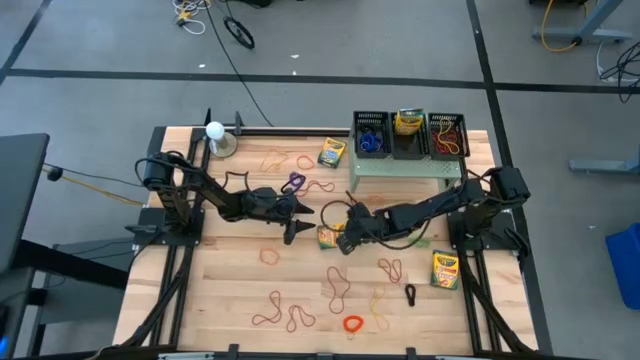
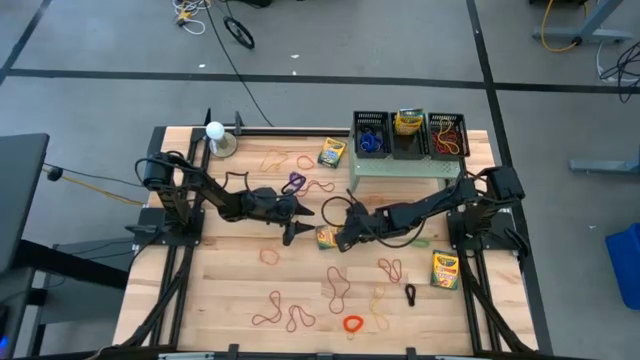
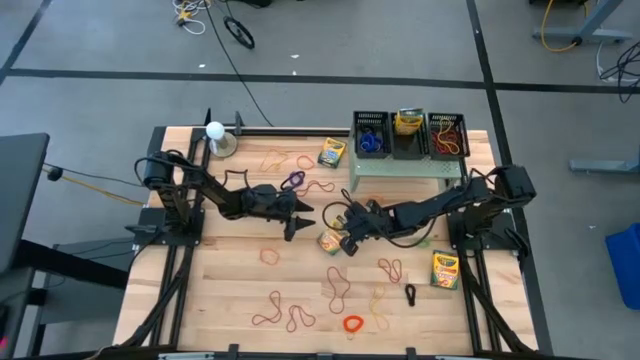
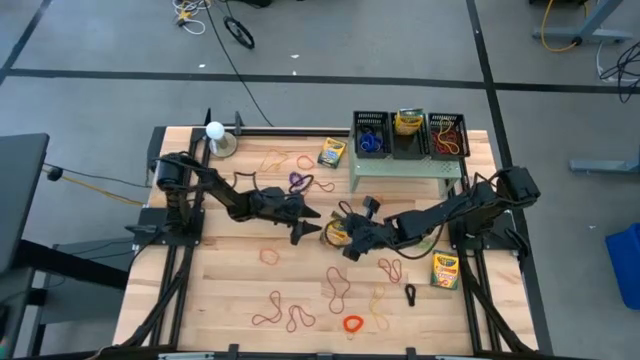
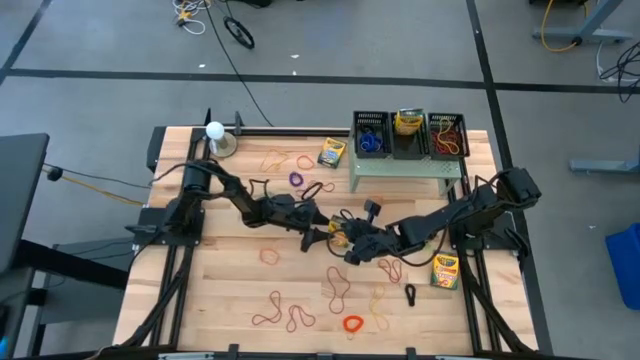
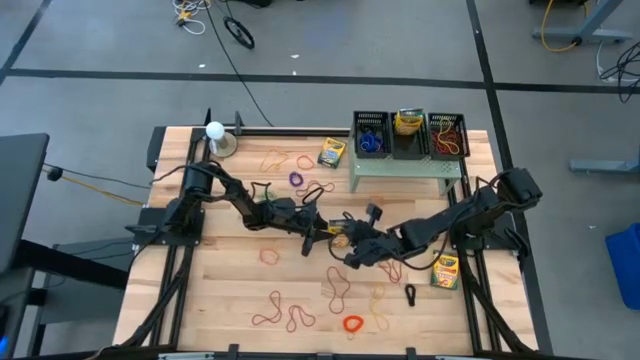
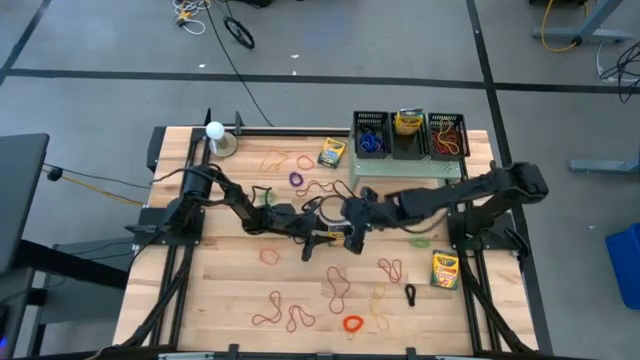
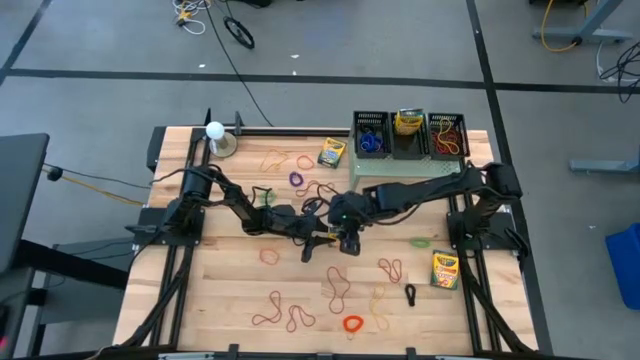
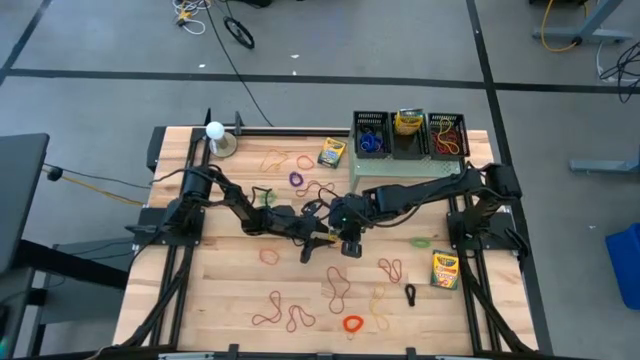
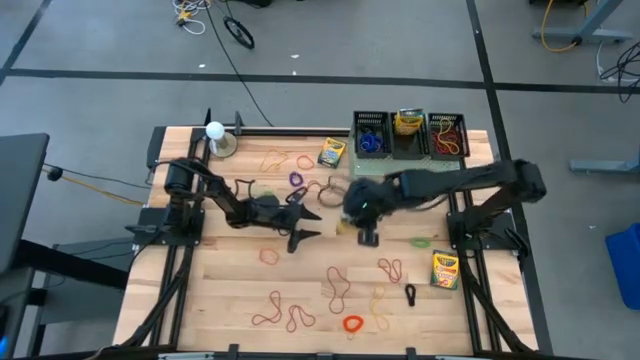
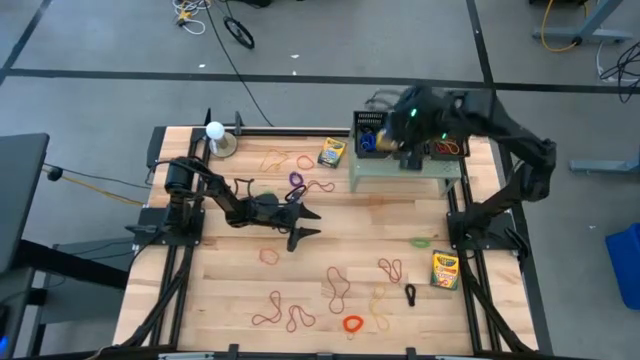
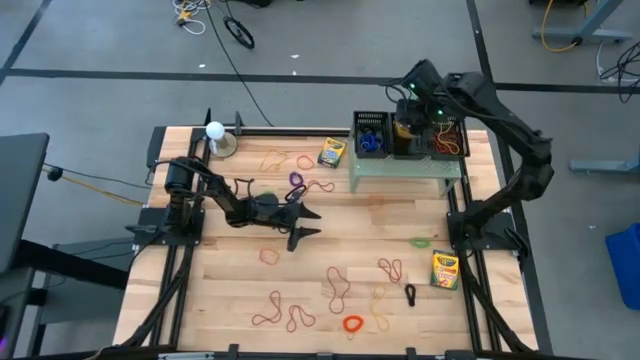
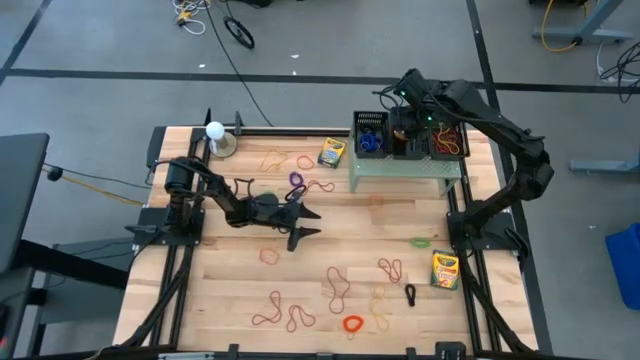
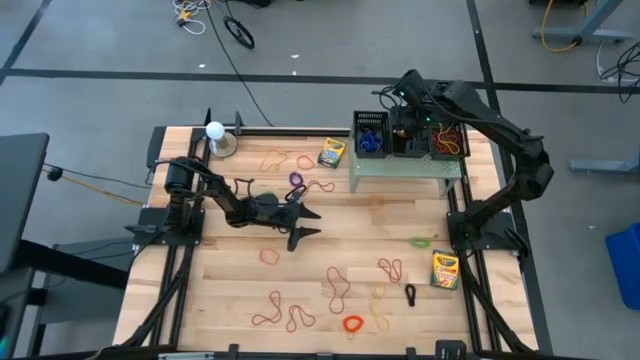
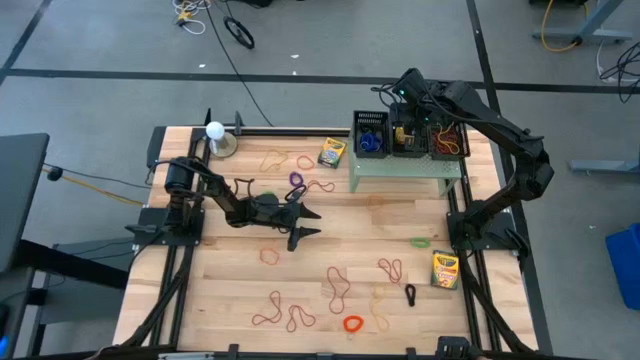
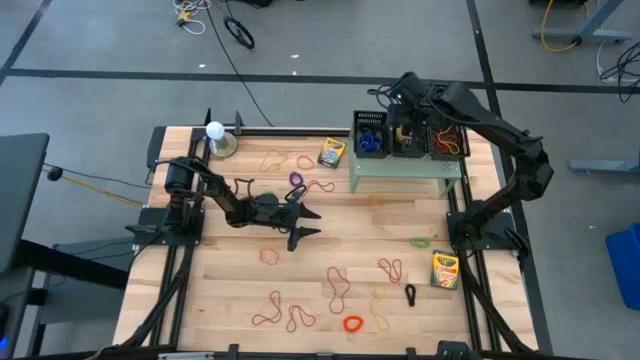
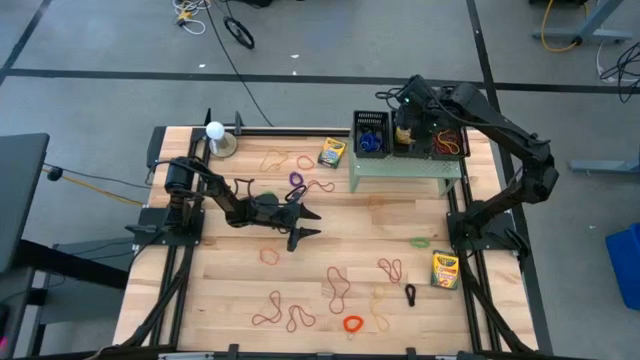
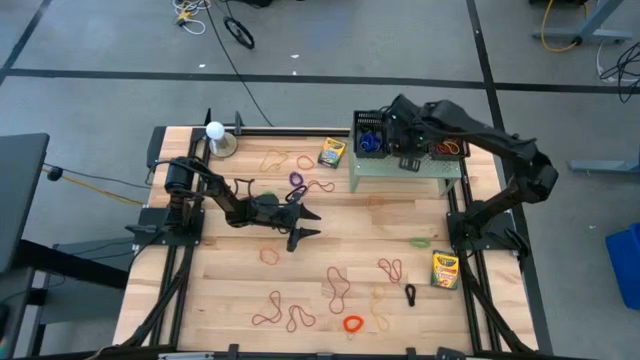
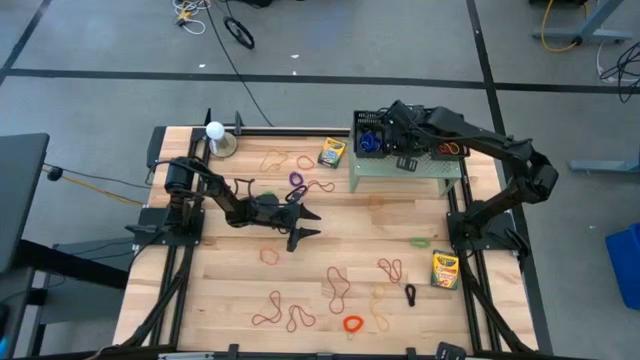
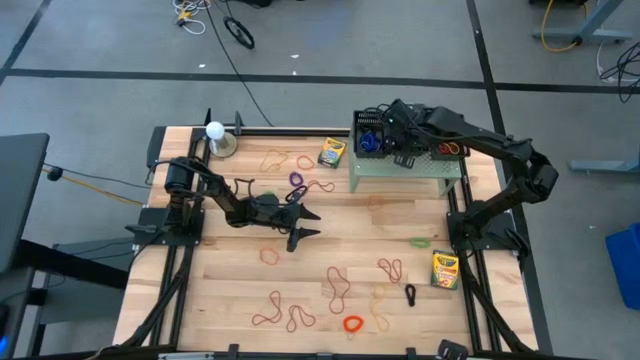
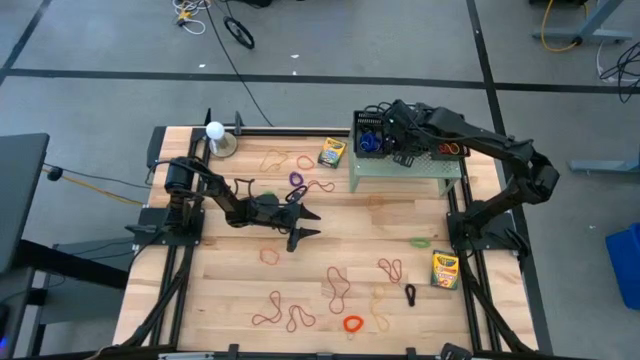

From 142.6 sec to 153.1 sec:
Task: Pick & Place Office Desk Supplies
Put the middle yellow crayon box into the middle black basket on the shelf

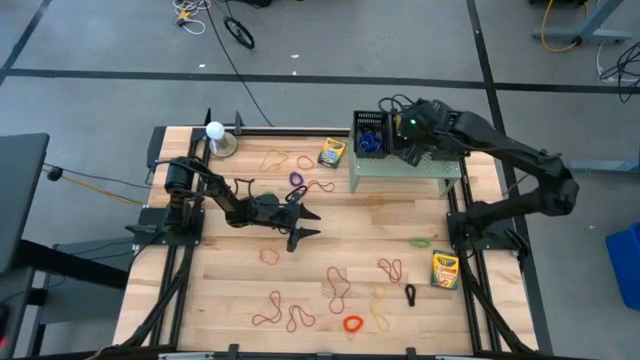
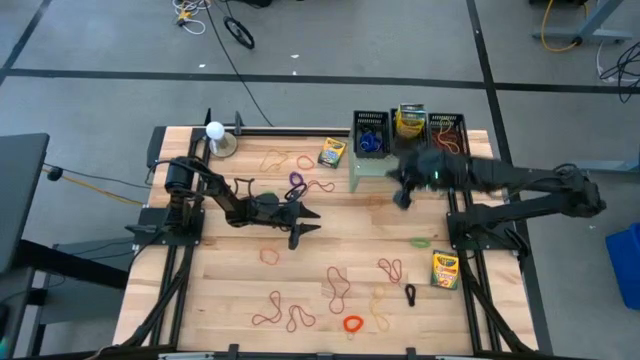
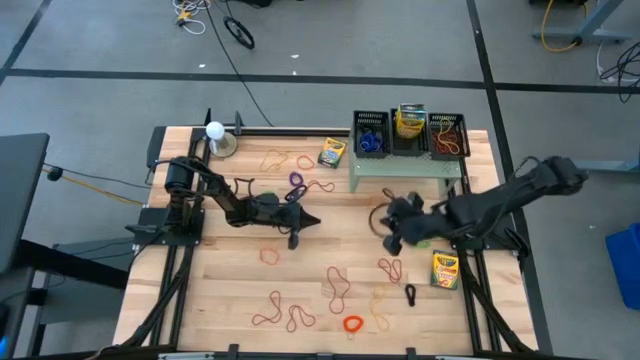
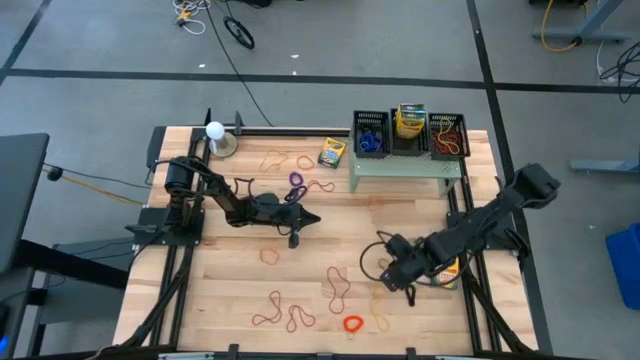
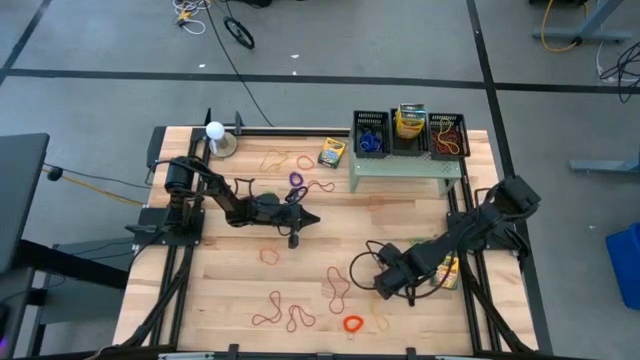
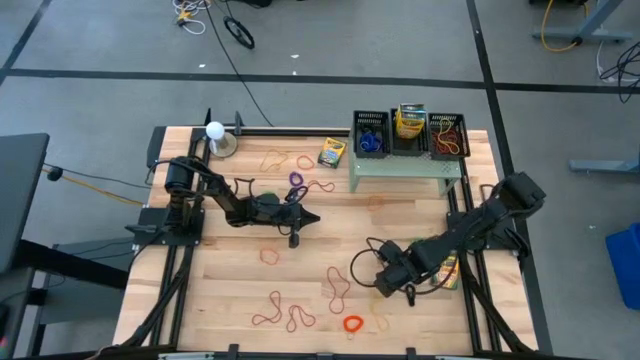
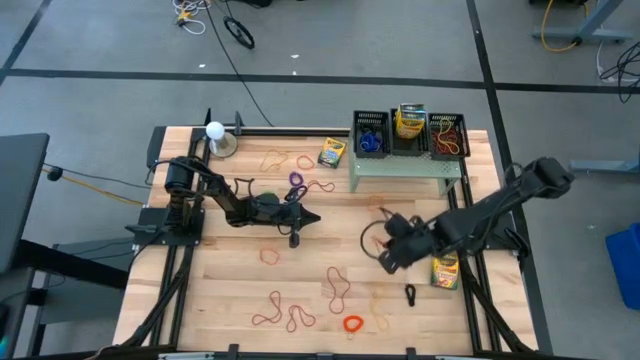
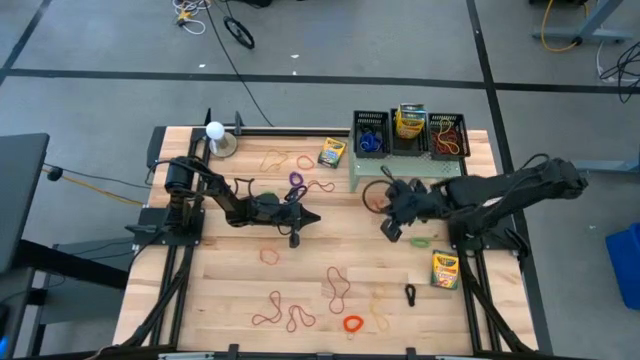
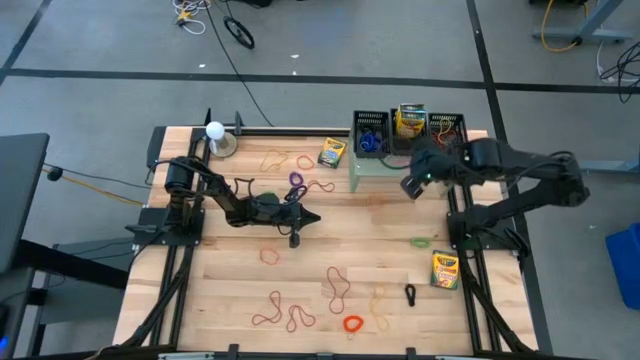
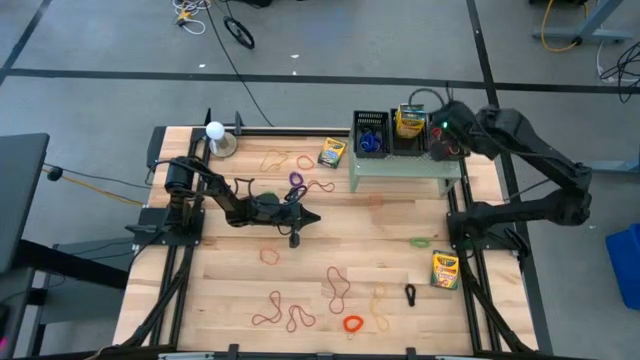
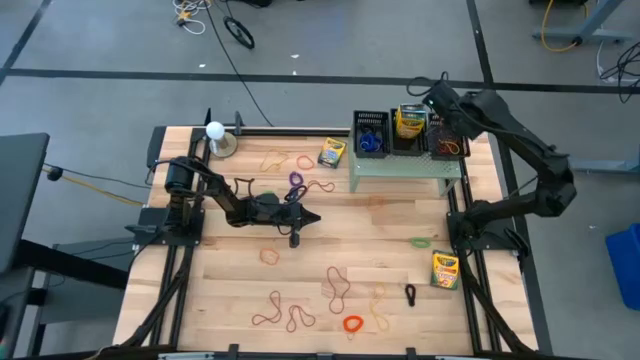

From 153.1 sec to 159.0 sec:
Put the red rubber band into the right black basket on the shelf

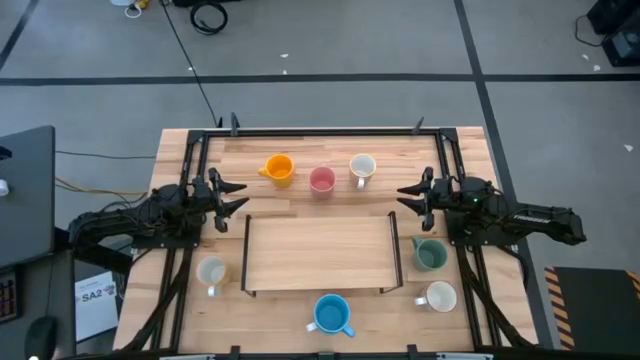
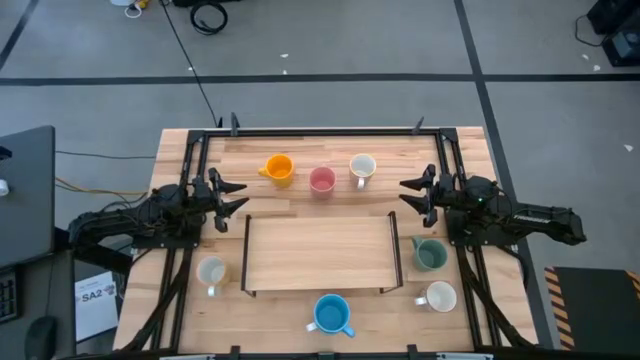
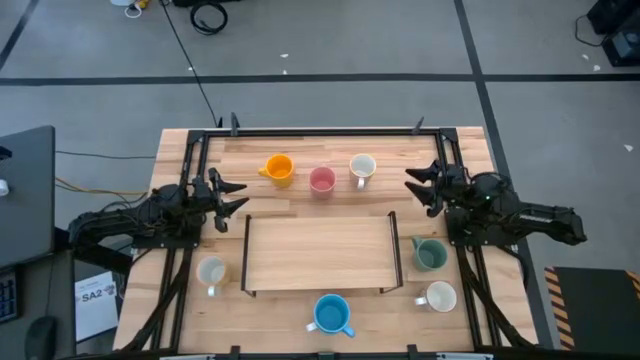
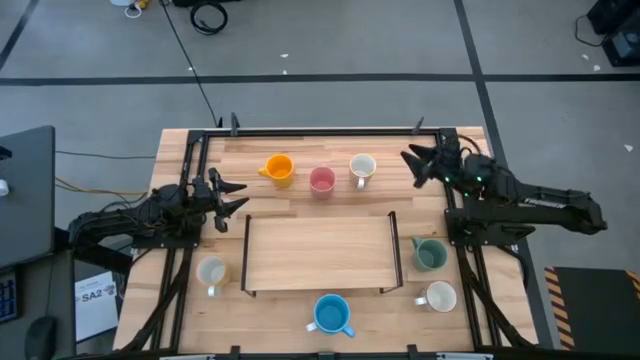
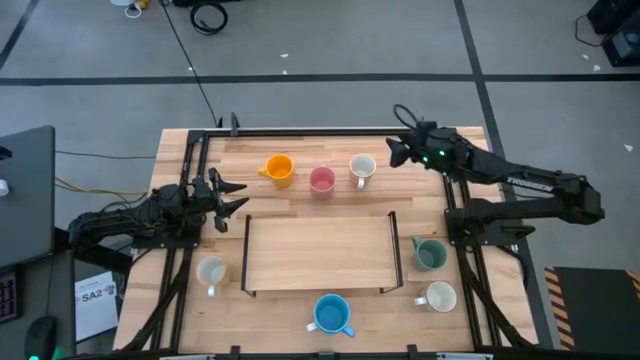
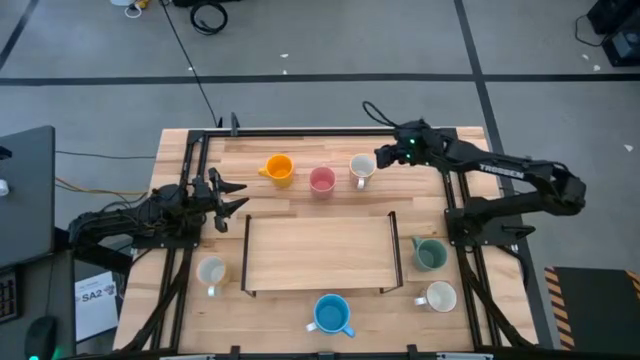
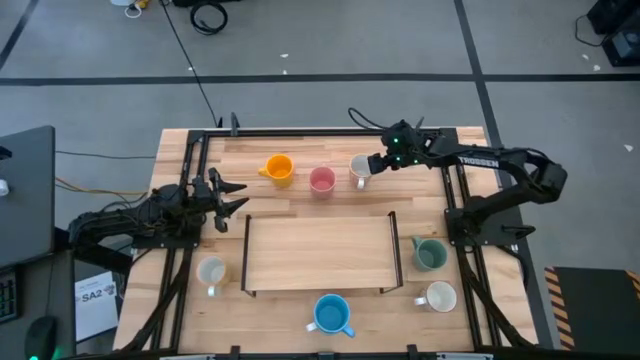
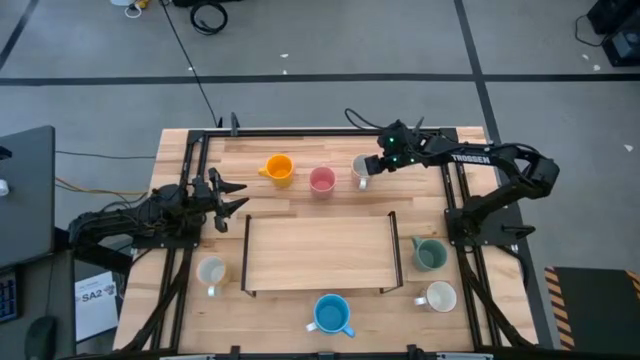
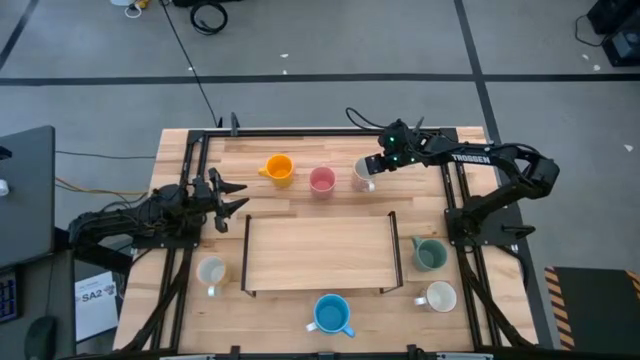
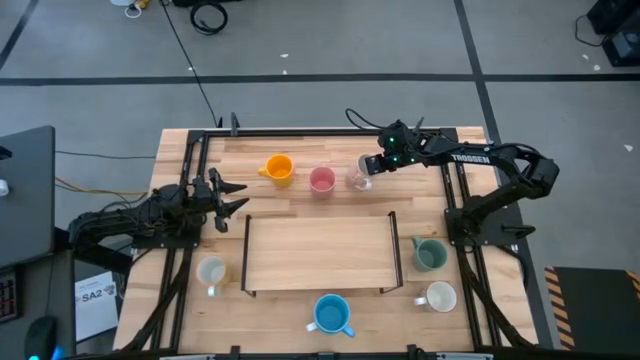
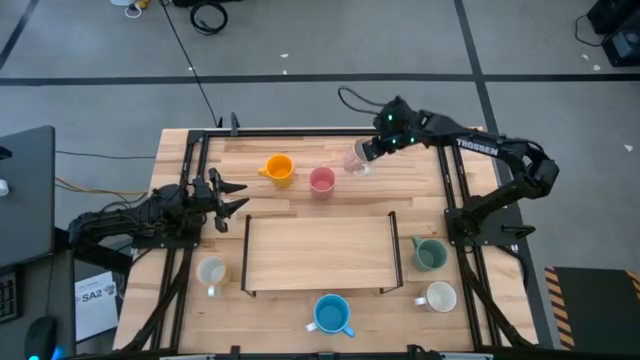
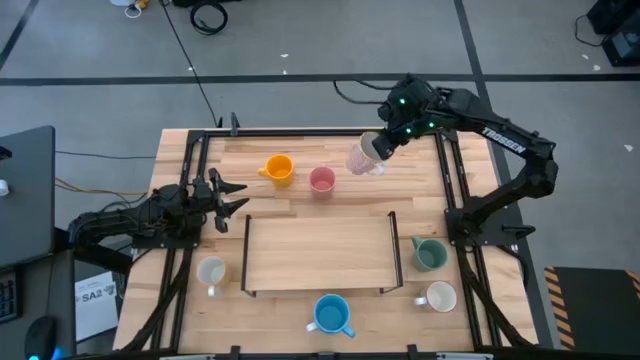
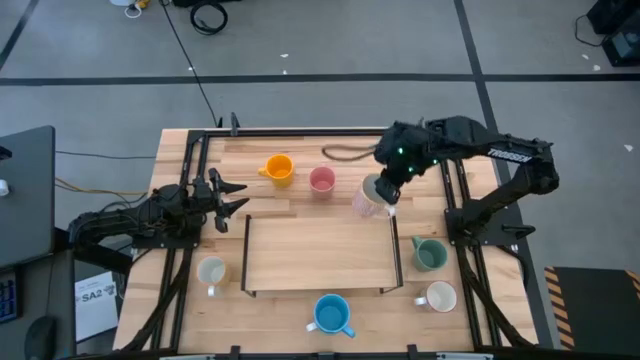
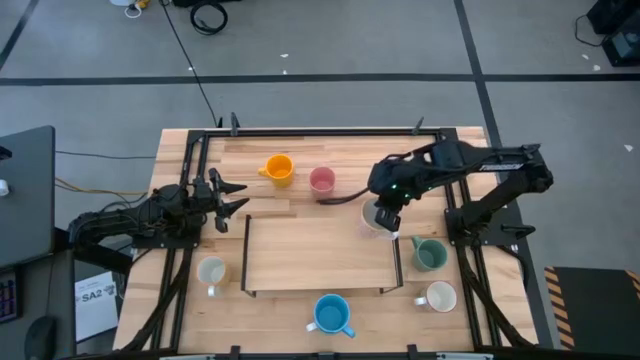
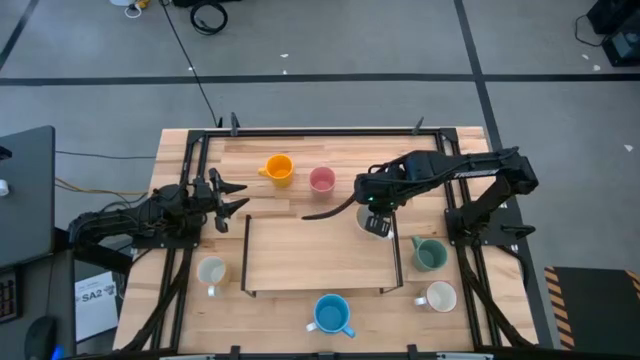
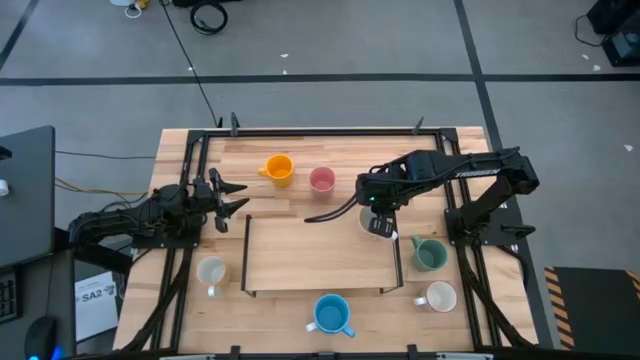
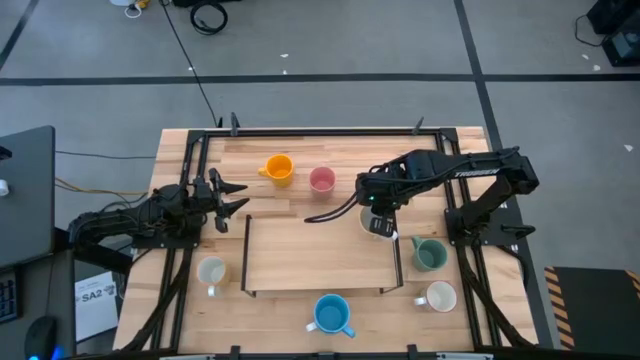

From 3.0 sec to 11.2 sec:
Task: Place coffee mugs
Put the orange patterned mug on the shelf
